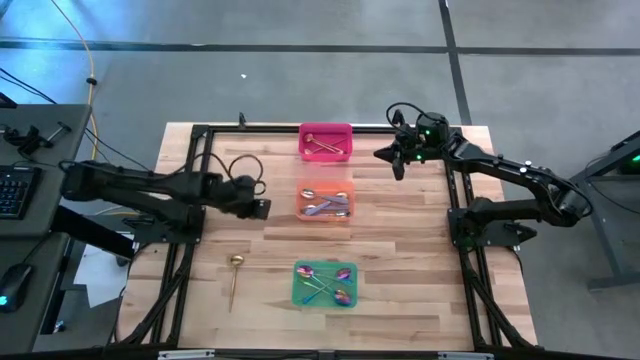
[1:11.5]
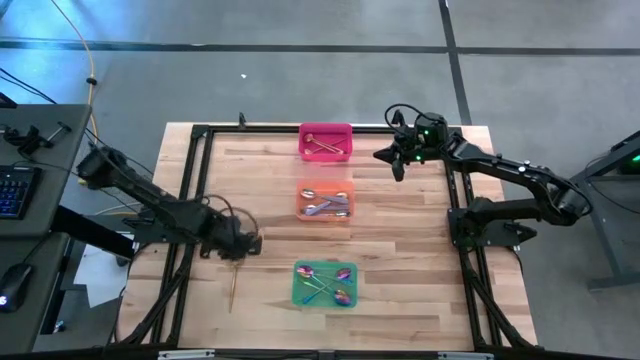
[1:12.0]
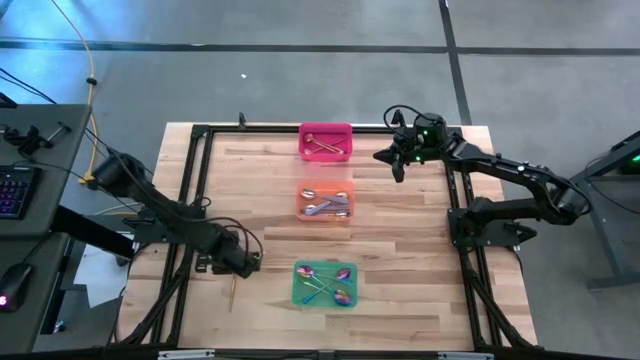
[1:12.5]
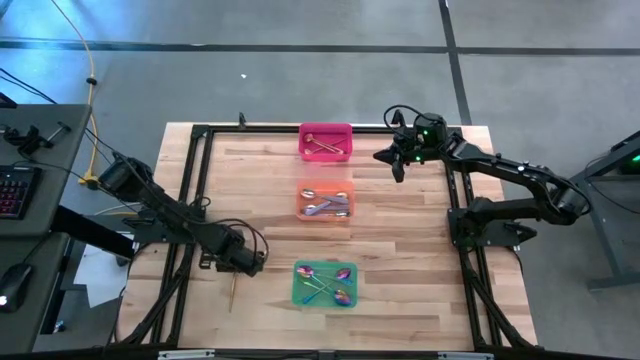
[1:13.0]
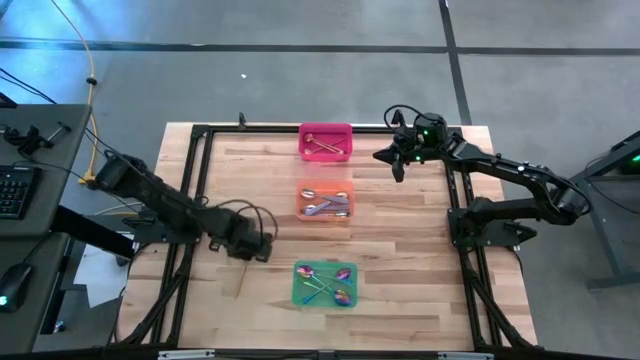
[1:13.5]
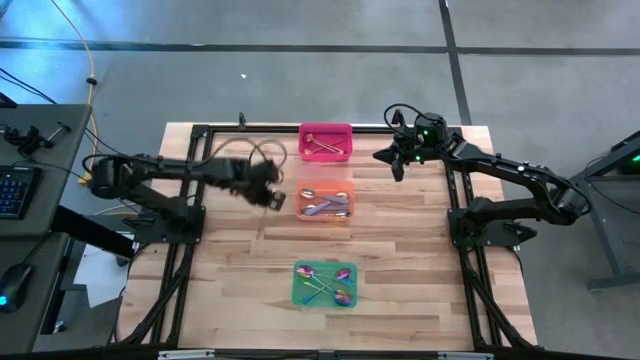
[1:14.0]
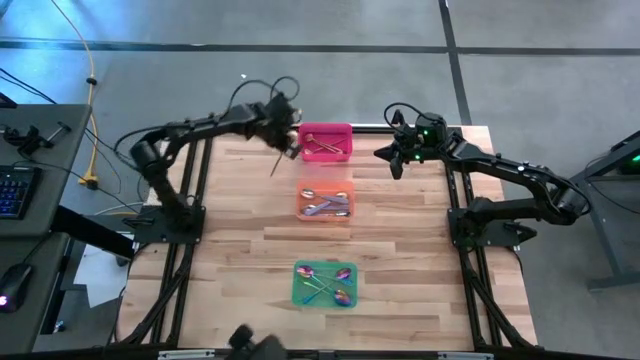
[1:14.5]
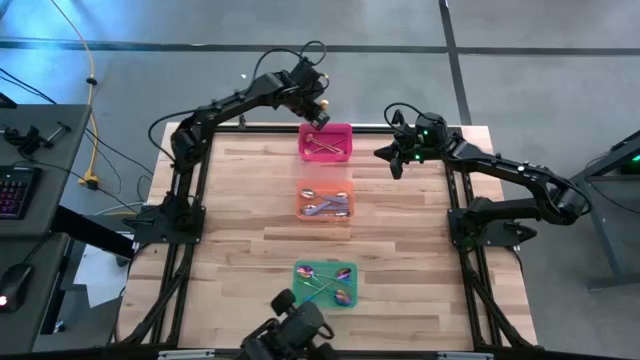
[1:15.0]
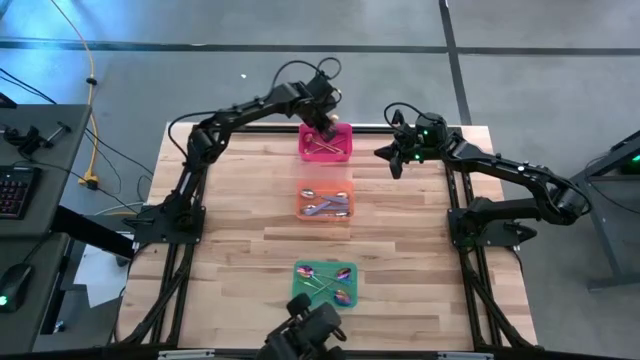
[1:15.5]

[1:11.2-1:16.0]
Task: Sort silverware by color (type)
Put the gold spoon into the red bin

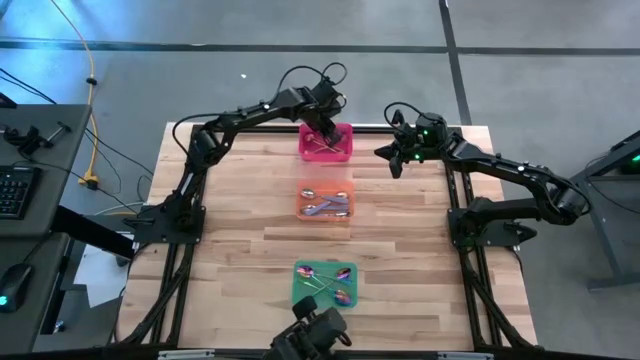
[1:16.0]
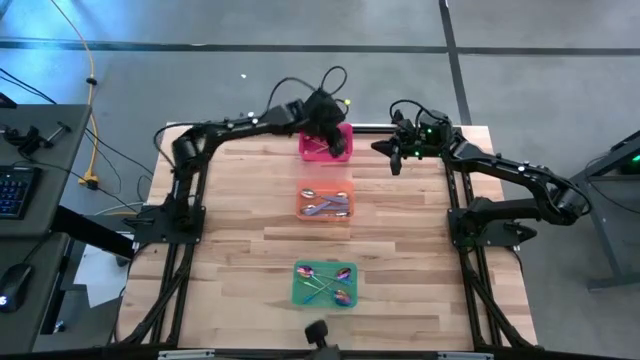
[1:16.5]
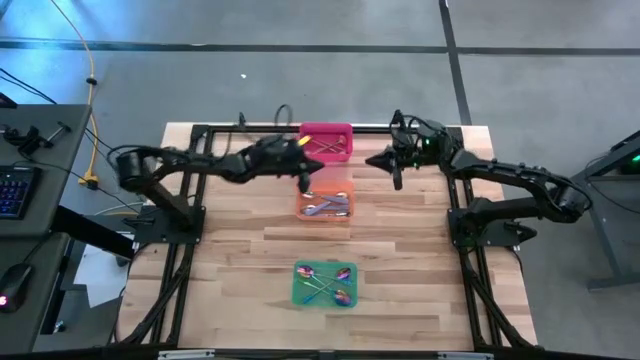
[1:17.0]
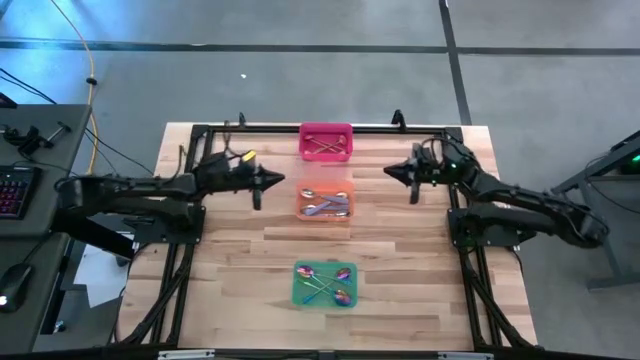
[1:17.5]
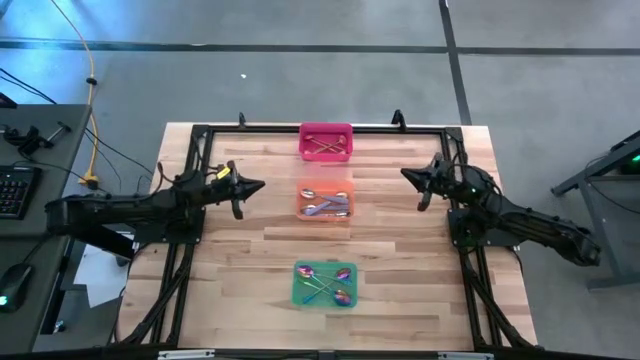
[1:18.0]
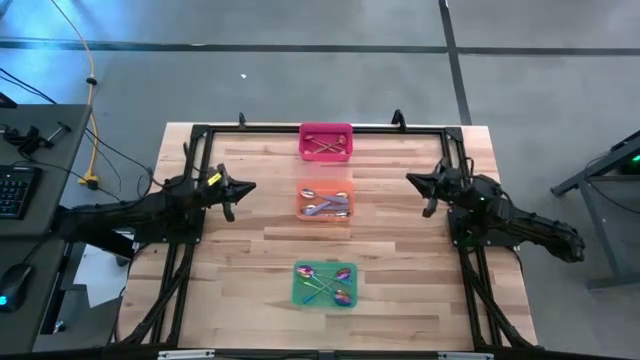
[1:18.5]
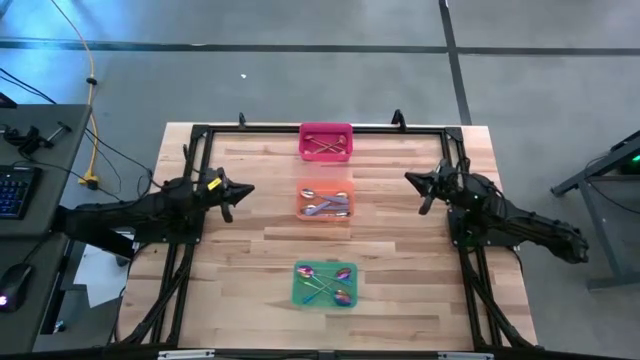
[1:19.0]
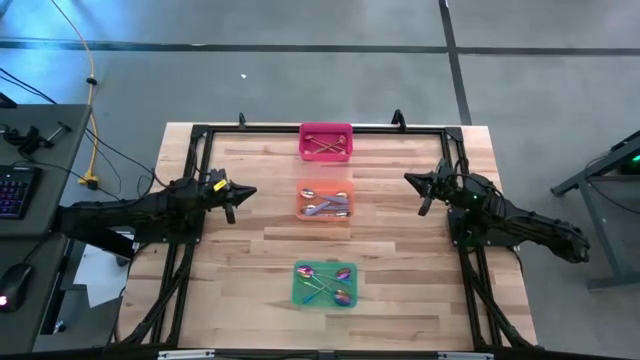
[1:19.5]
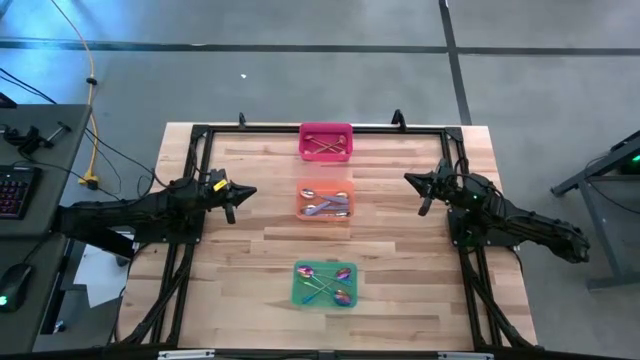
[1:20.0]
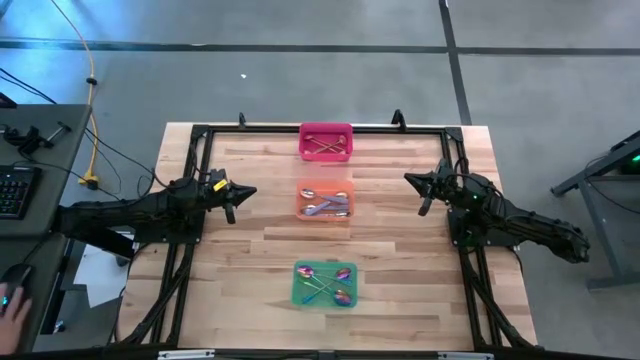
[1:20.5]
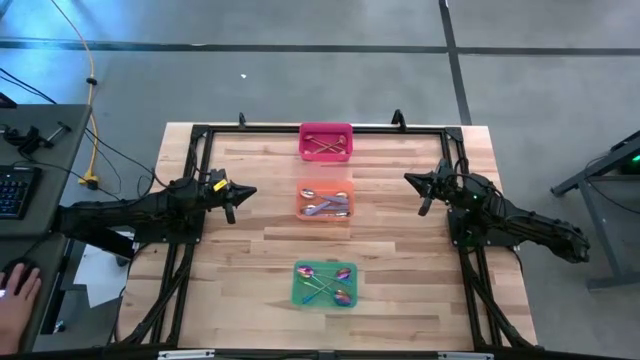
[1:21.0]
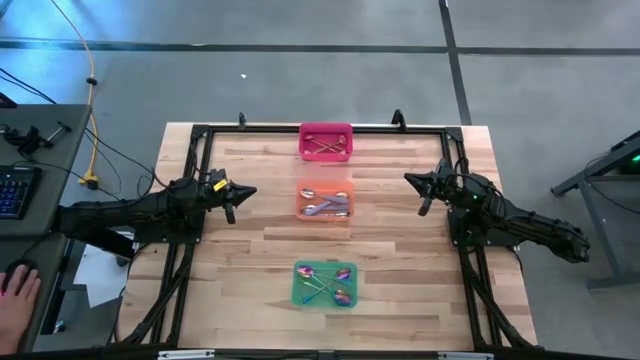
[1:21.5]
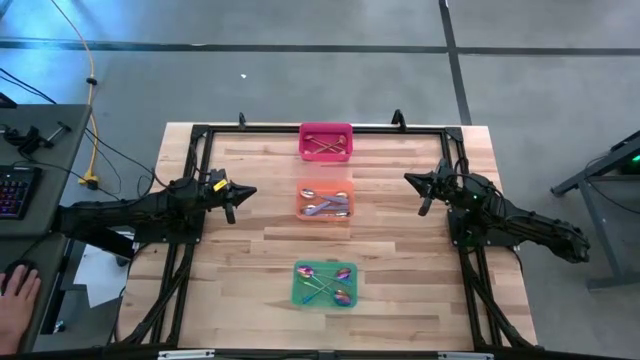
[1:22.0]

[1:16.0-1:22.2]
Return to Home Position

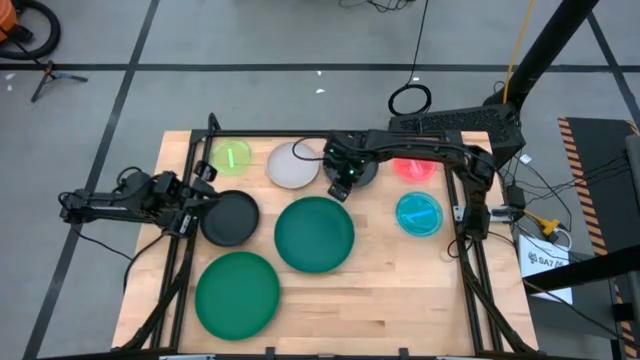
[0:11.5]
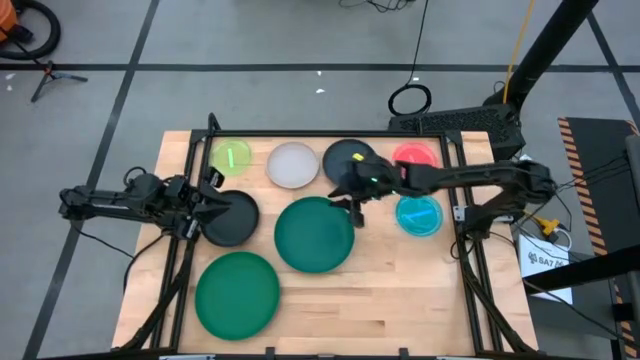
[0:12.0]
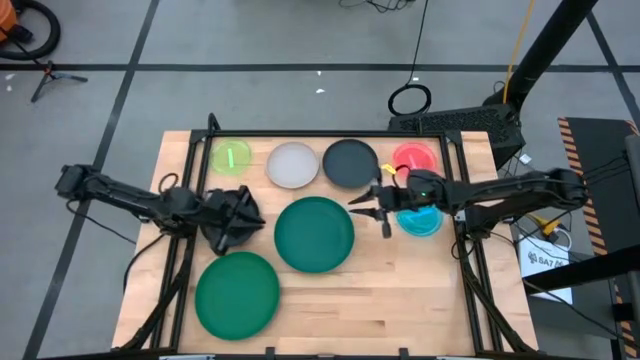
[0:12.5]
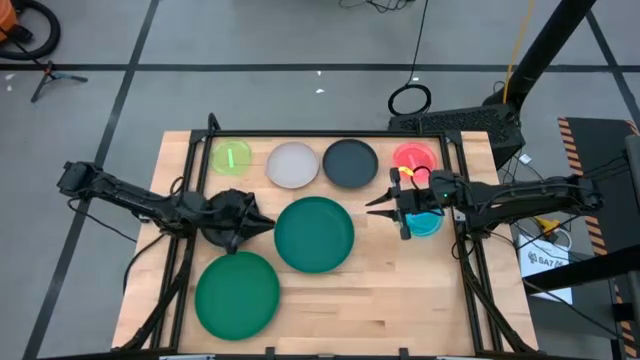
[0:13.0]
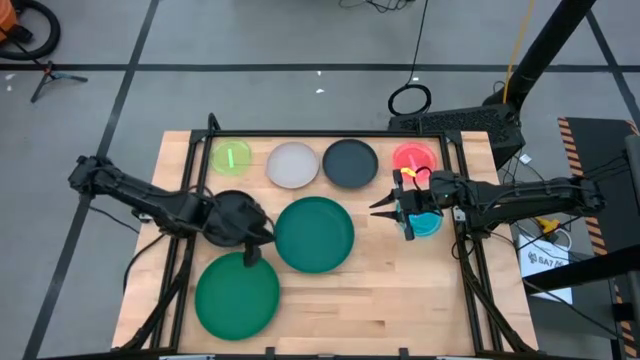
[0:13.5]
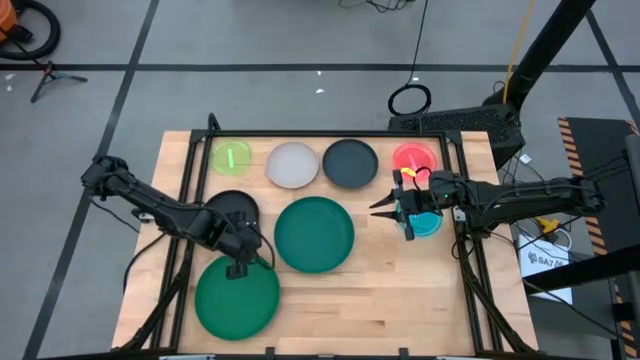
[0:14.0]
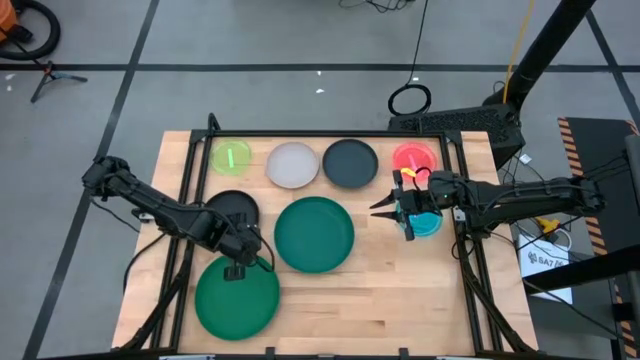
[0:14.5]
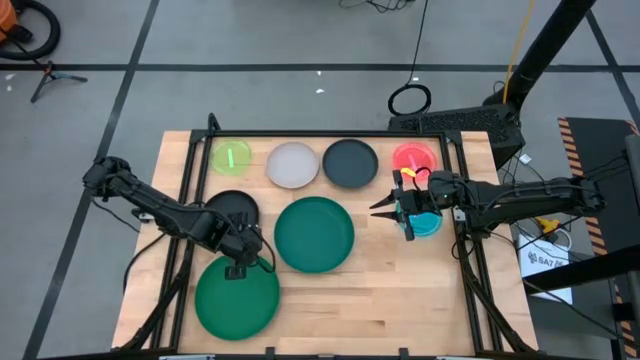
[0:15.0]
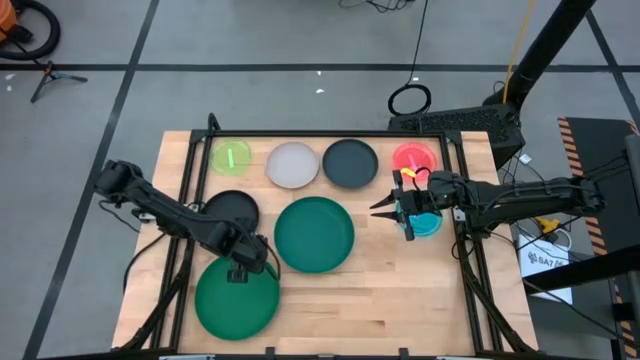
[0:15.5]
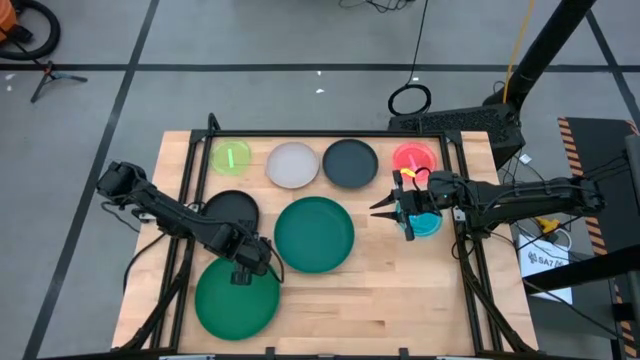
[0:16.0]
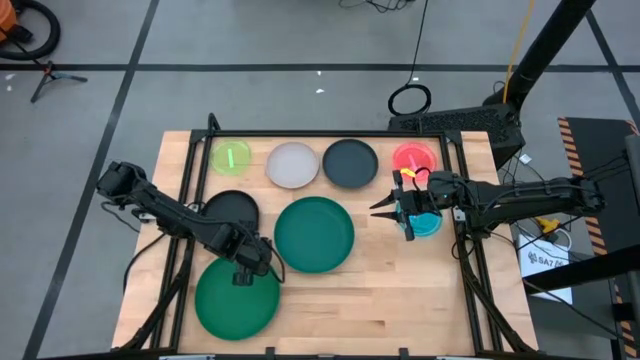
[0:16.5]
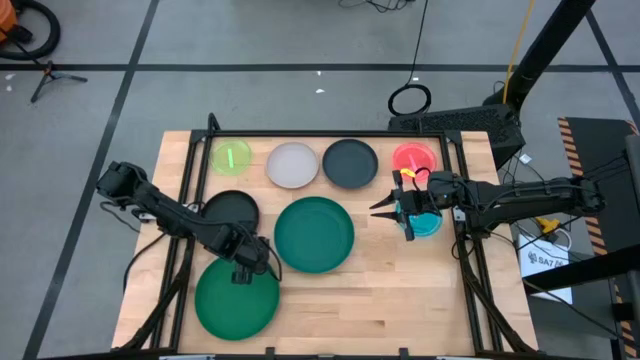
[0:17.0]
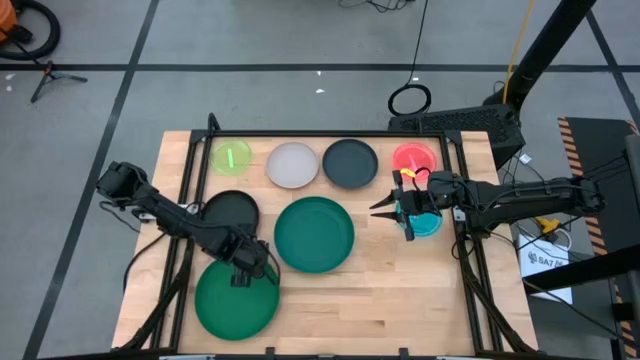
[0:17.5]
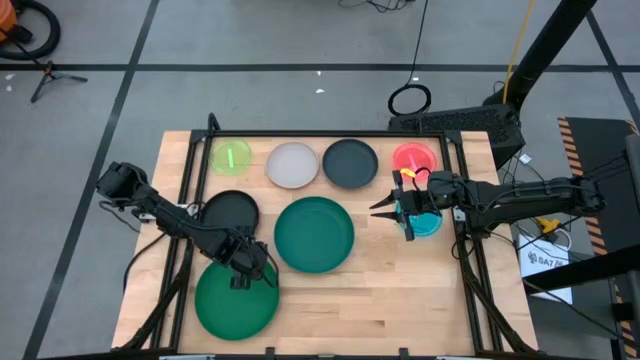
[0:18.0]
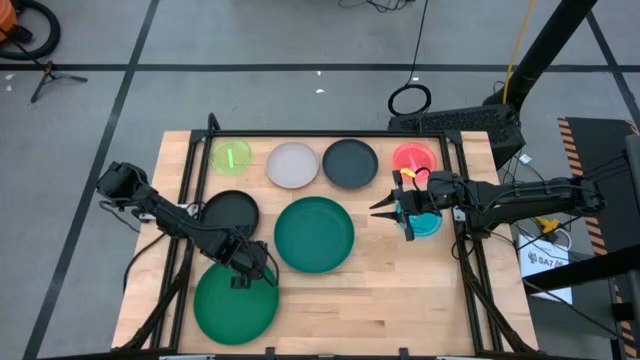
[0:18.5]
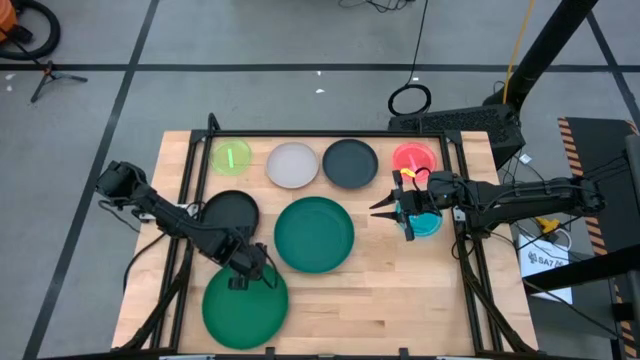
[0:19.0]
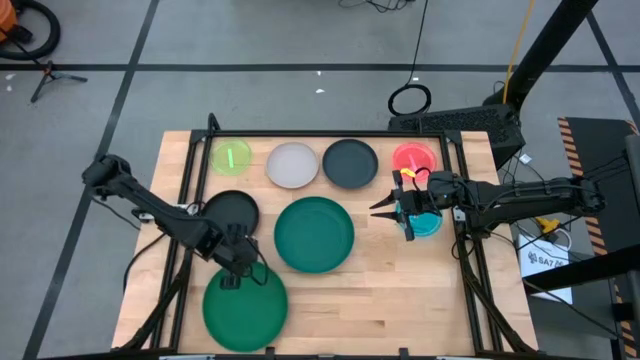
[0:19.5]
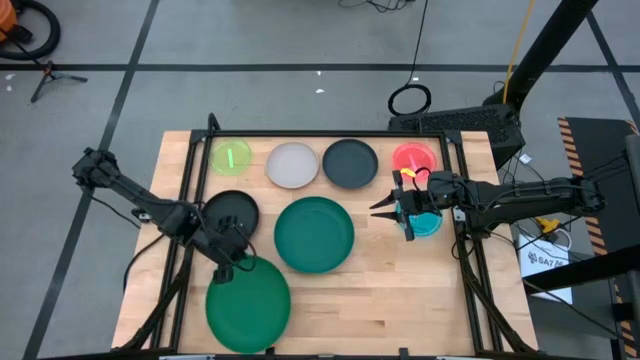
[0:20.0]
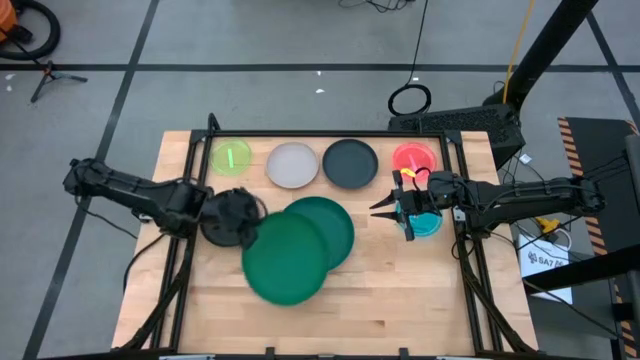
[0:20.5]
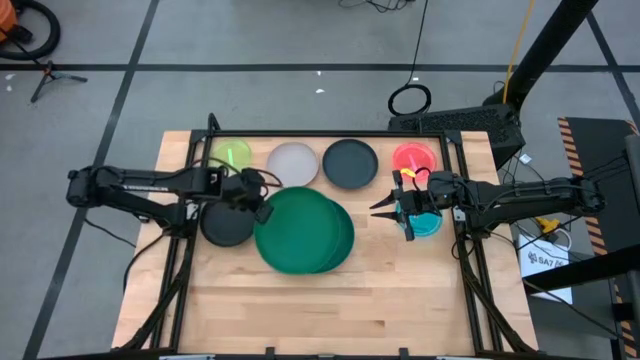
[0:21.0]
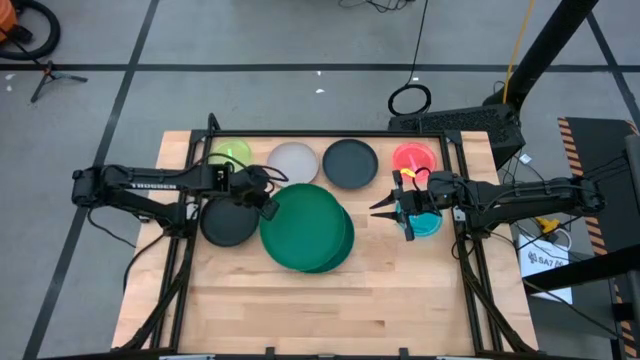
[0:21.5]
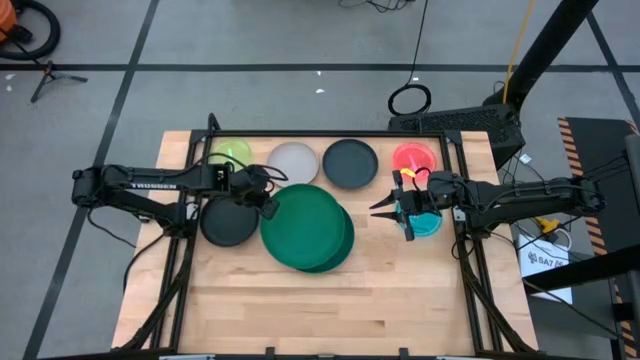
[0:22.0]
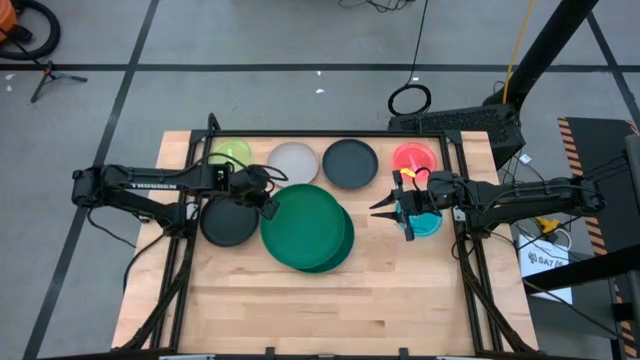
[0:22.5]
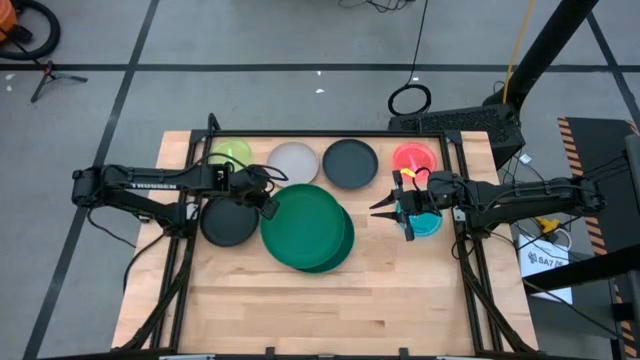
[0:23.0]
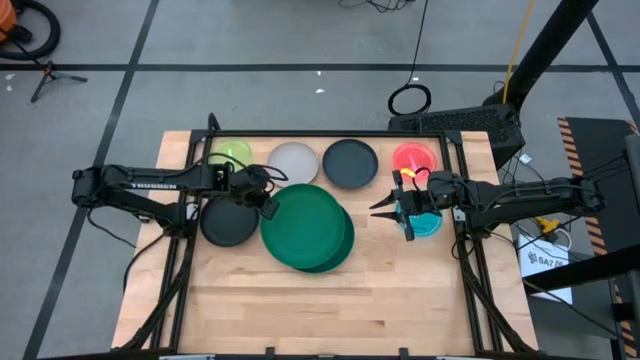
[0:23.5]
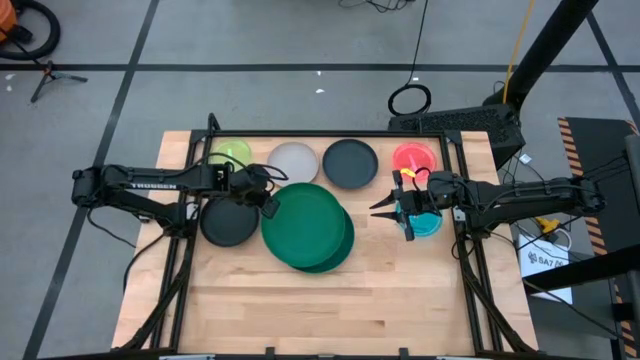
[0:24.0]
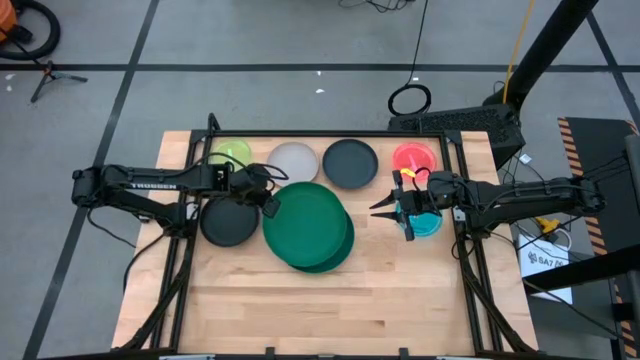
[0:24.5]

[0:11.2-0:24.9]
Task: Stack plastic plates
Stack the dark green plate on top of the other dark green plate
